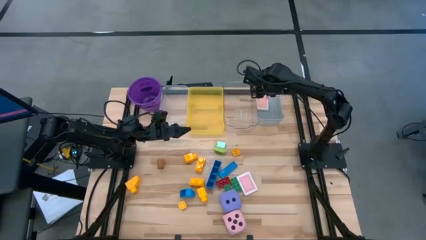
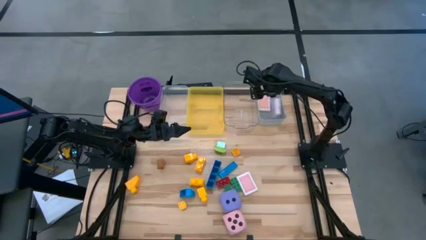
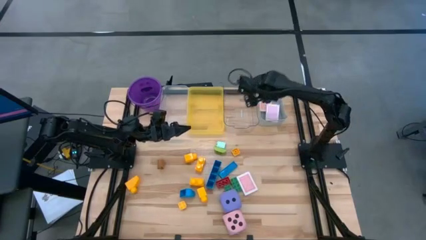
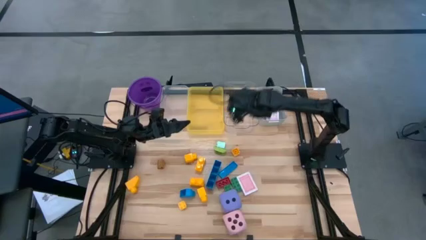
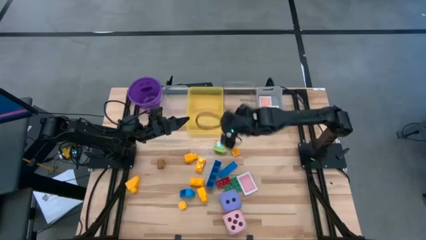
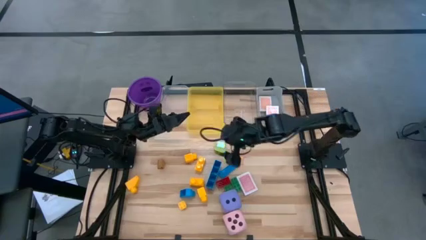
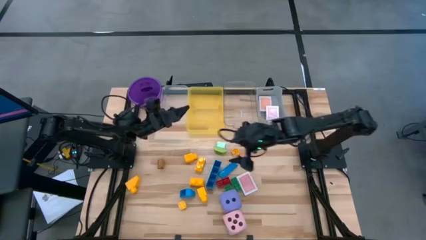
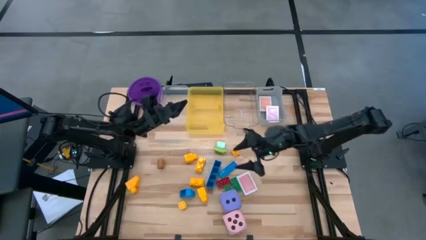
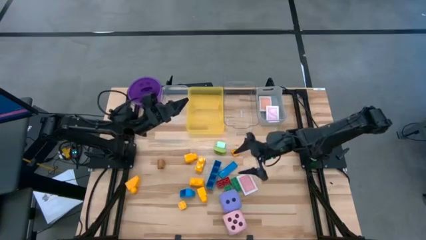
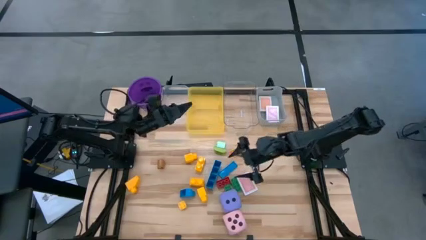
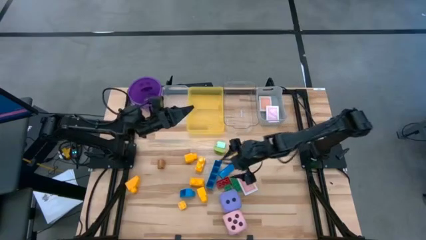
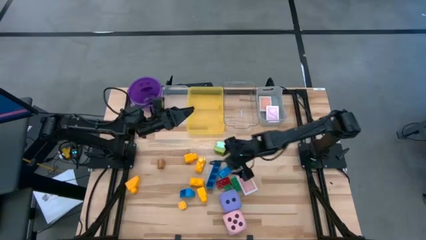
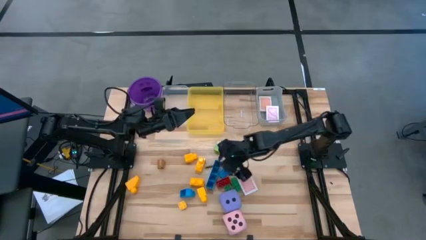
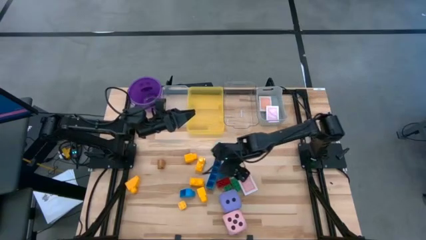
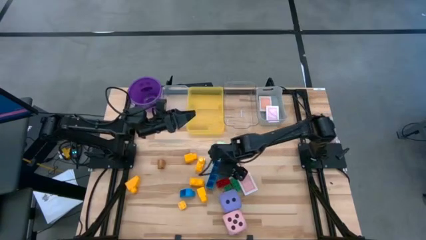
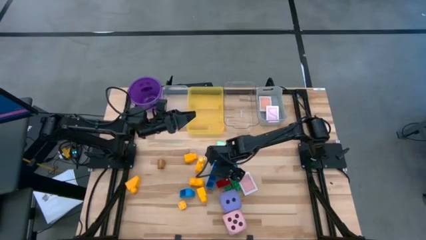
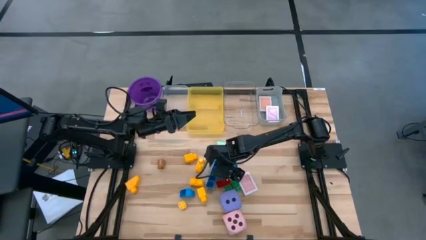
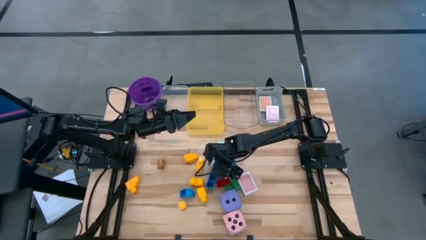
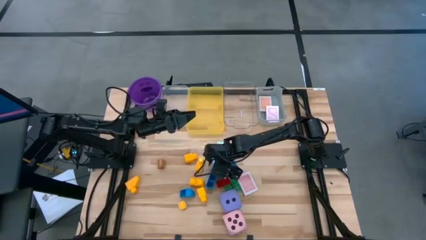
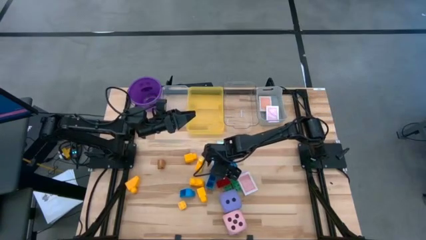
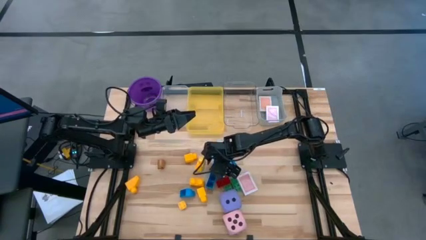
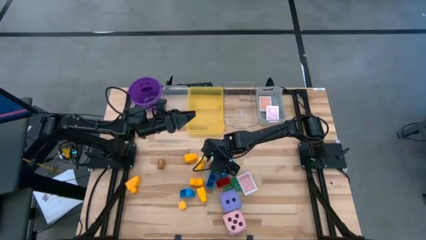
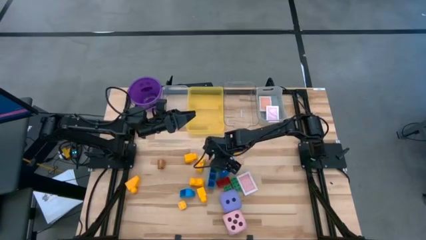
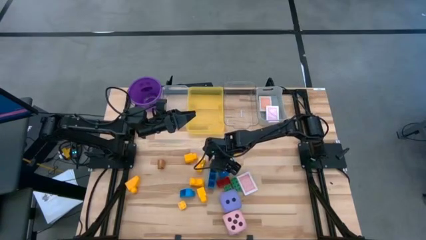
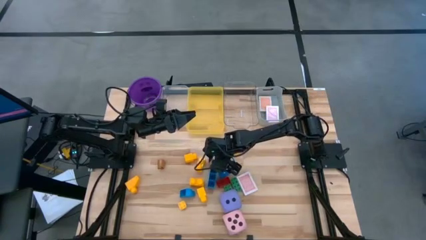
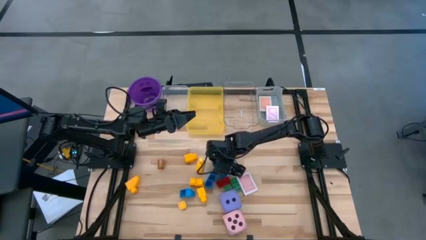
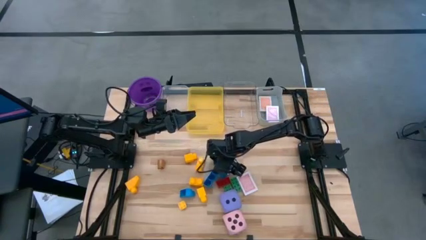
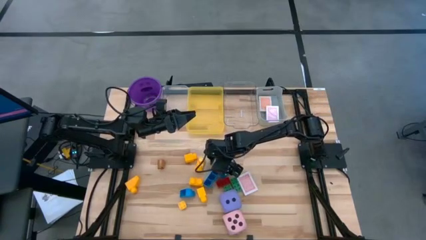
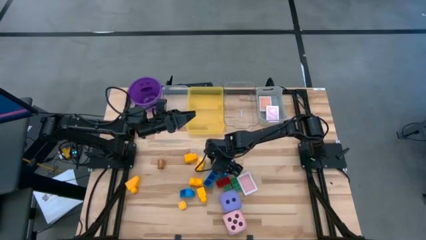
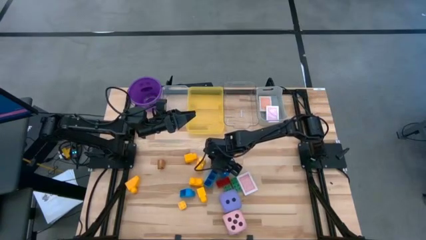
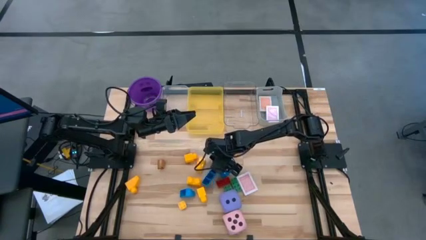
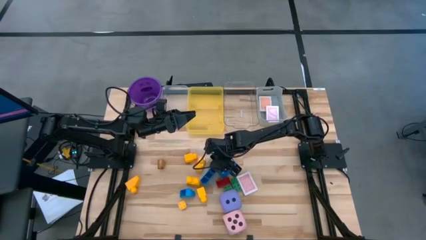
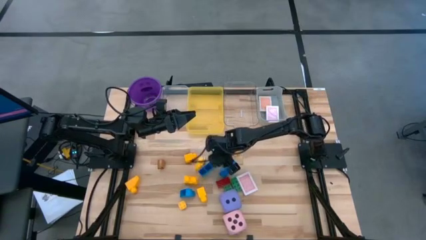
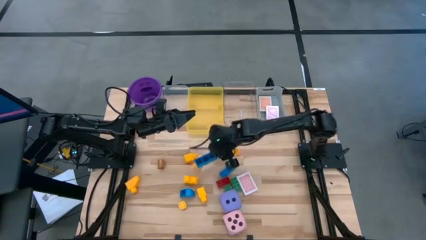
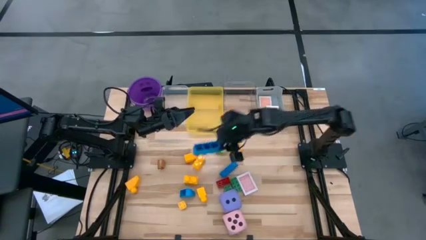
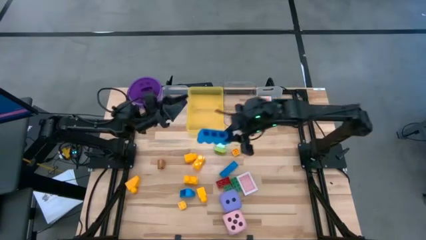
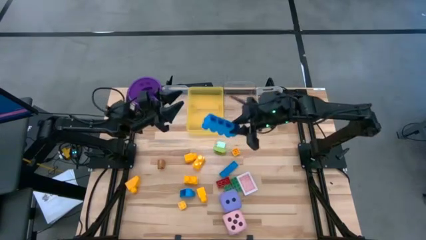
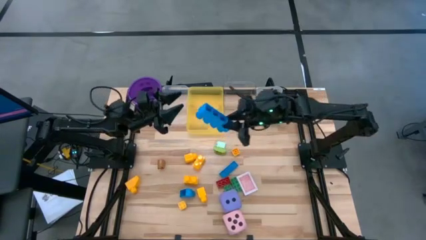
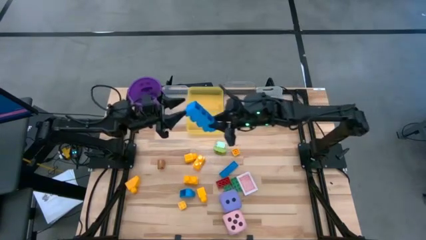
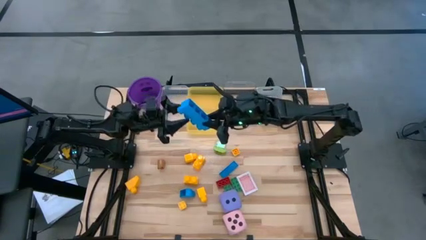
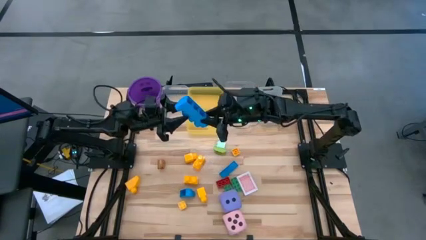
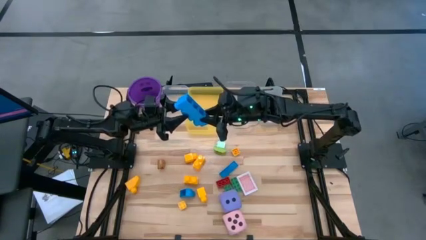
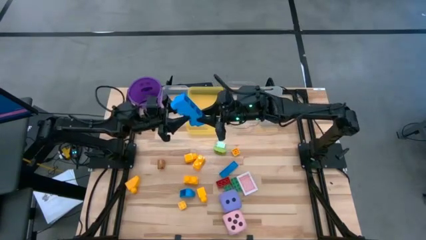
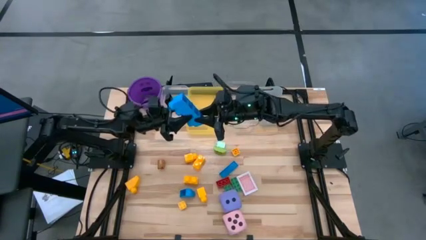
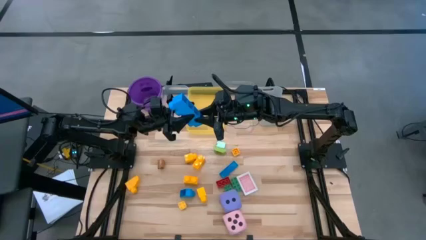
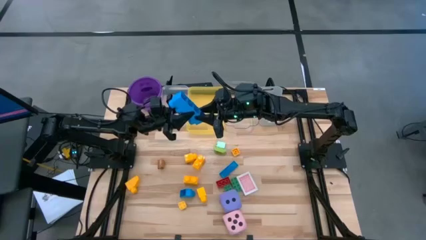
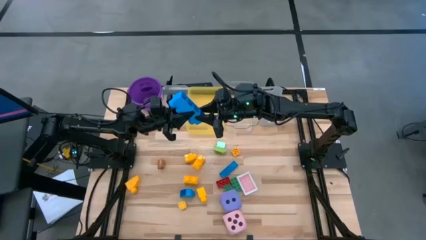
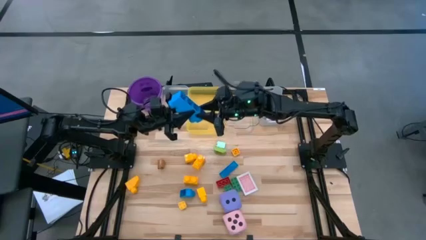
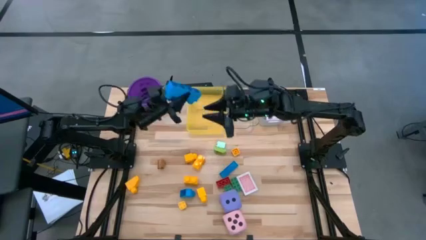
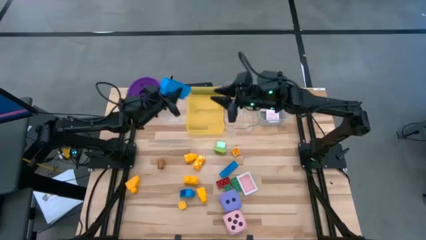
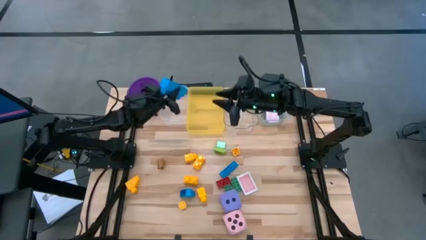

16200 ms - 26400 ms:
Task: Pick & Place Toys
Put the big blue game piece into the white bin

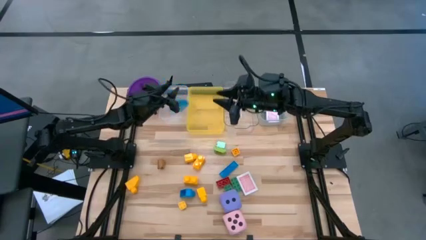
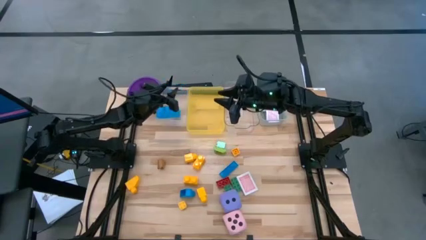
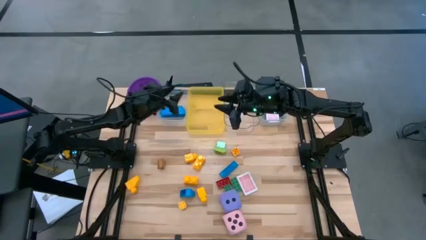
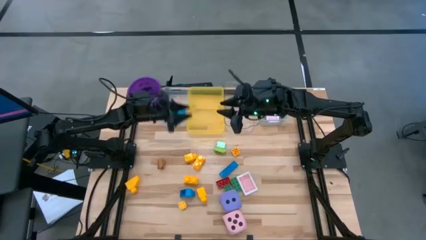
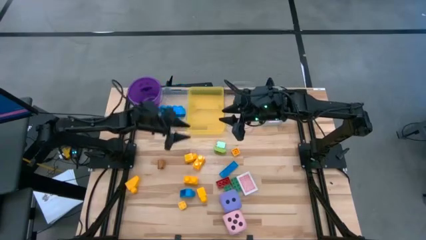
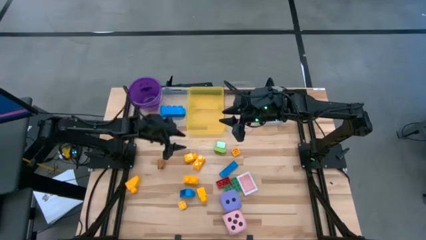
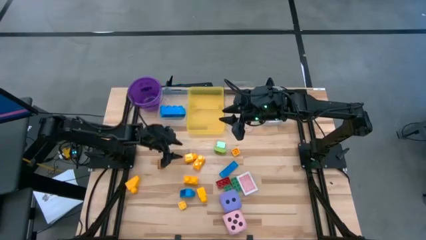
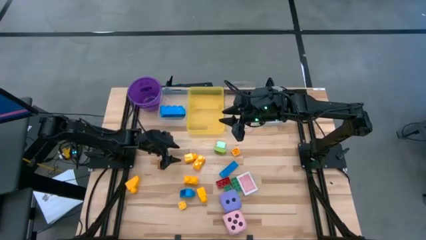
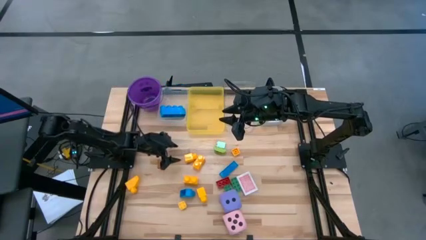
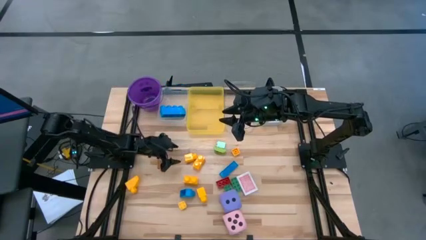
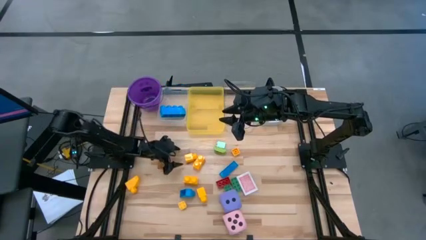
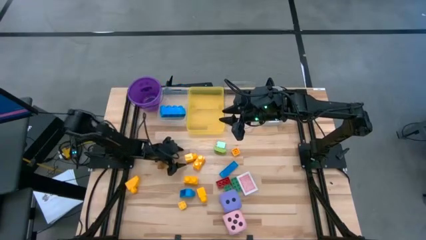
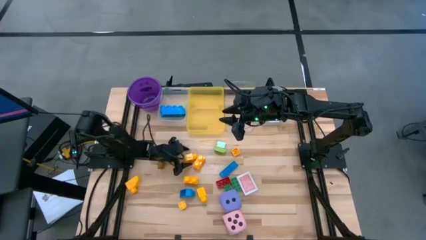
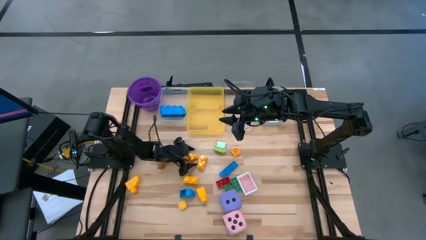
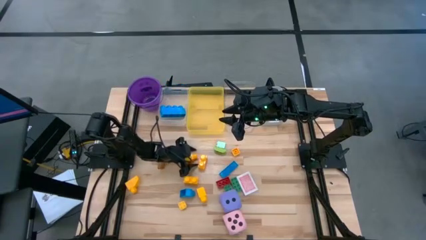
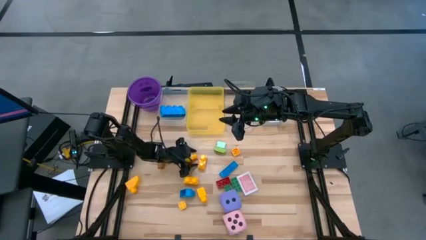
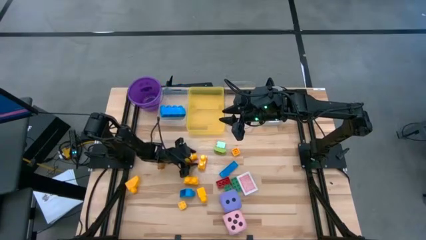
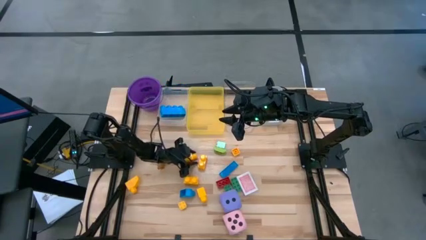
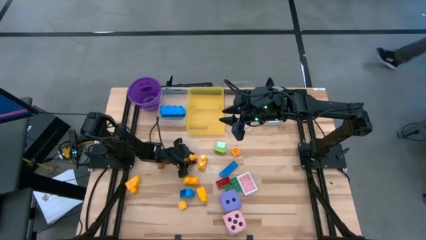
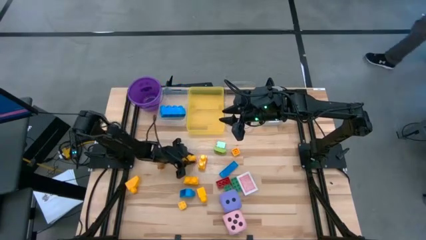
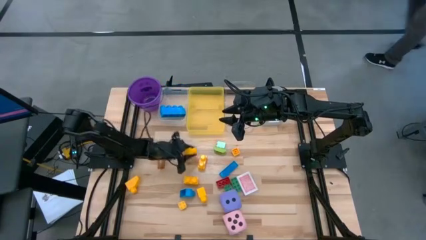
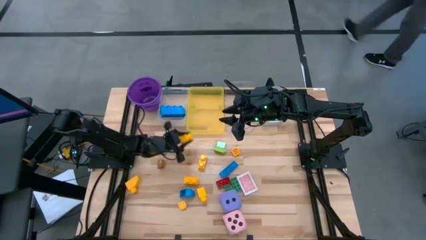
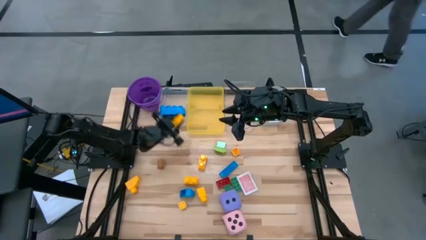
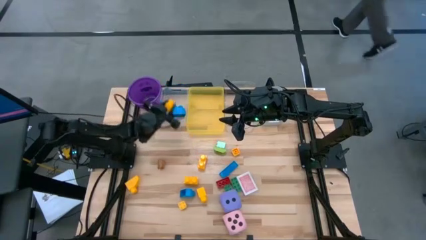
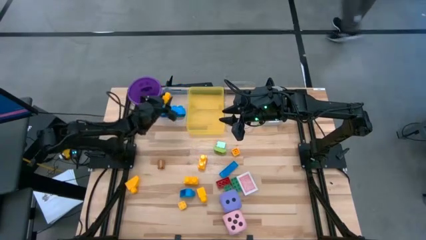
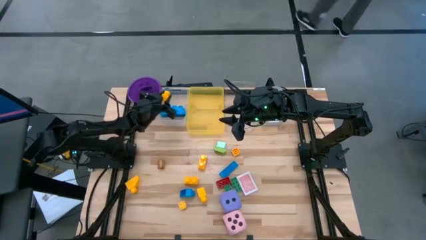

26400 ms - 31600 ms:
Put the big yellow game piece into the white bin
